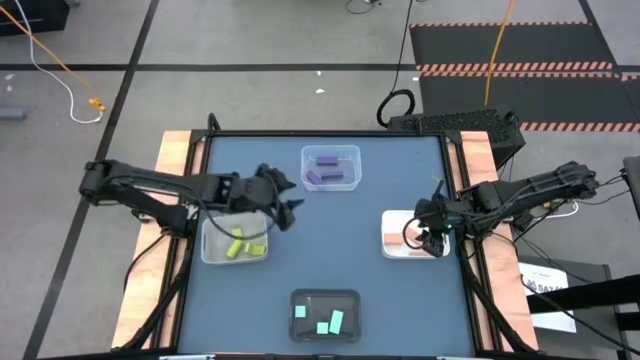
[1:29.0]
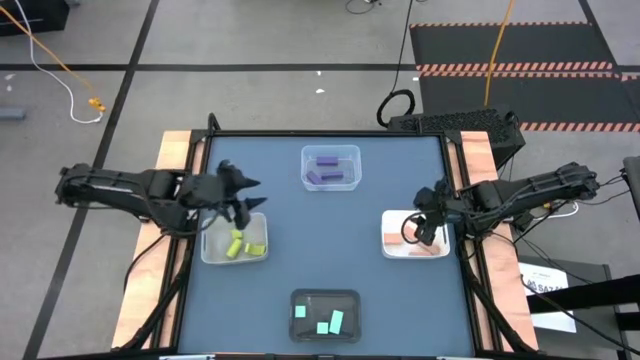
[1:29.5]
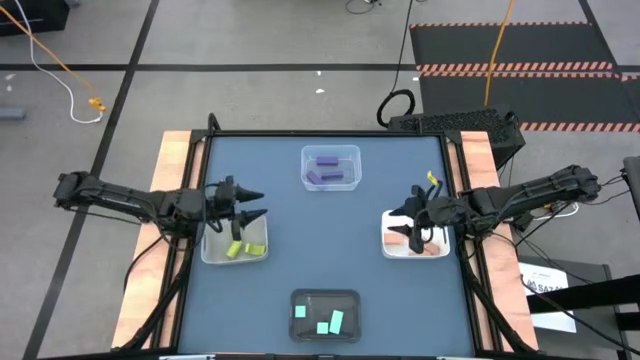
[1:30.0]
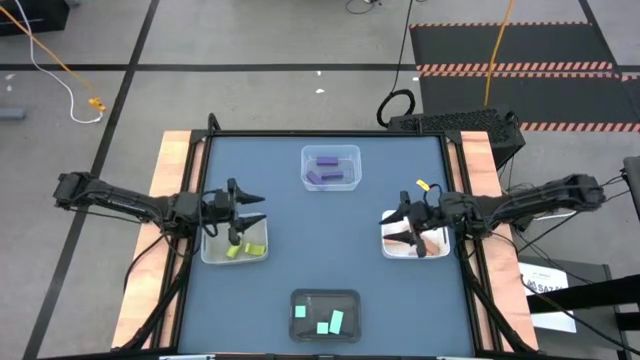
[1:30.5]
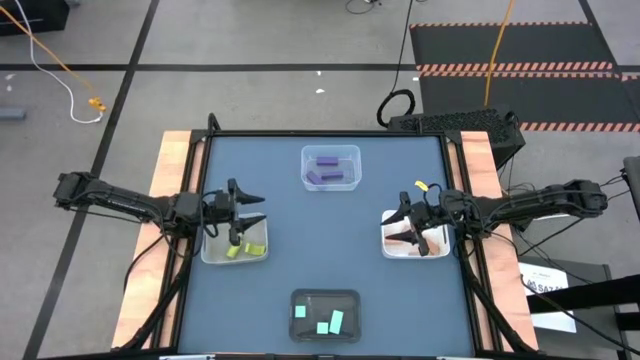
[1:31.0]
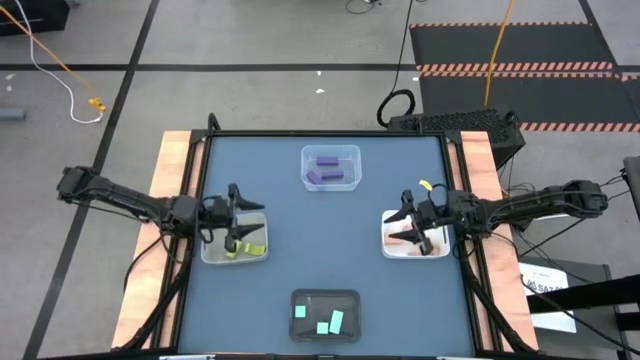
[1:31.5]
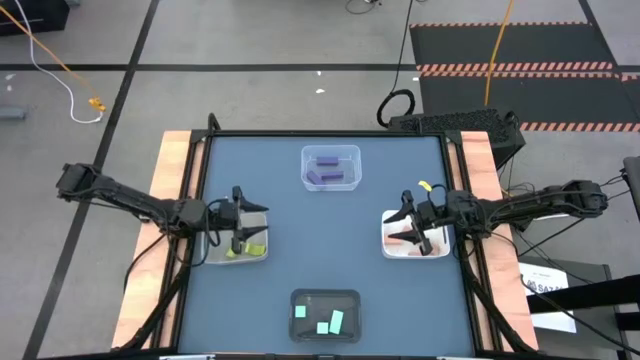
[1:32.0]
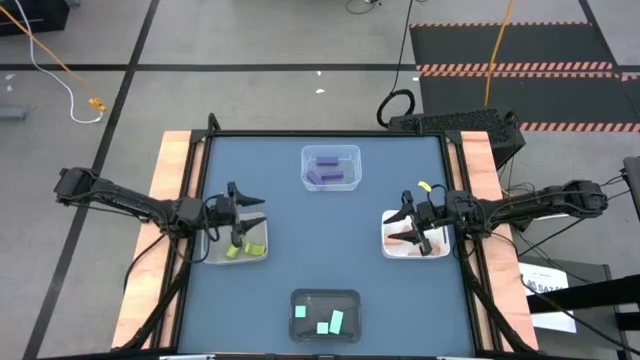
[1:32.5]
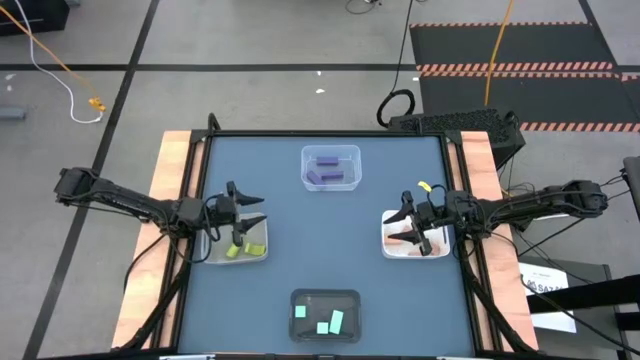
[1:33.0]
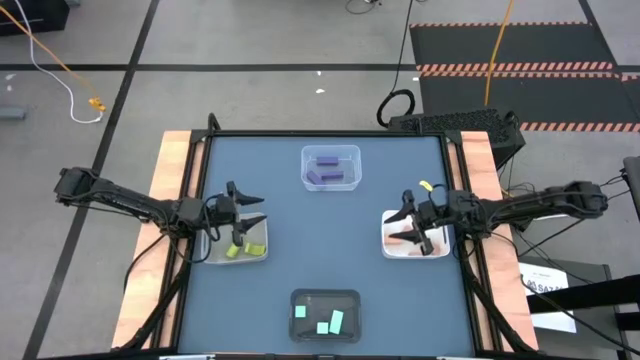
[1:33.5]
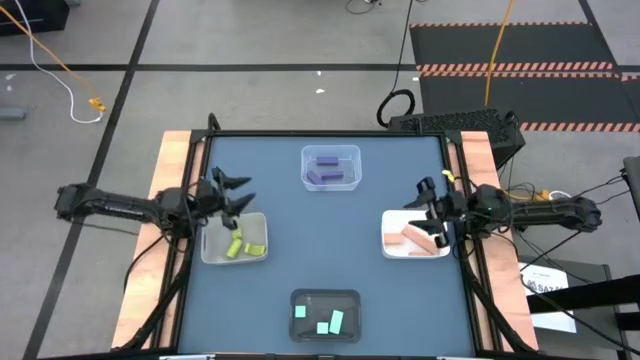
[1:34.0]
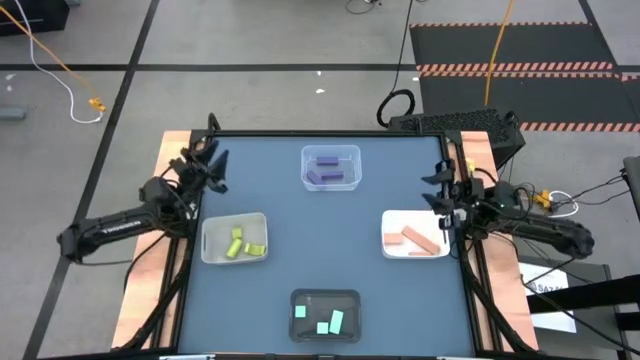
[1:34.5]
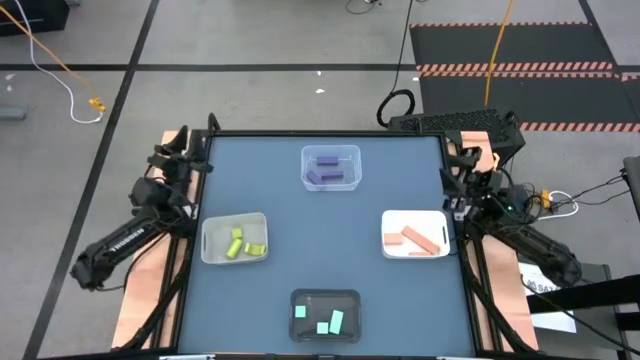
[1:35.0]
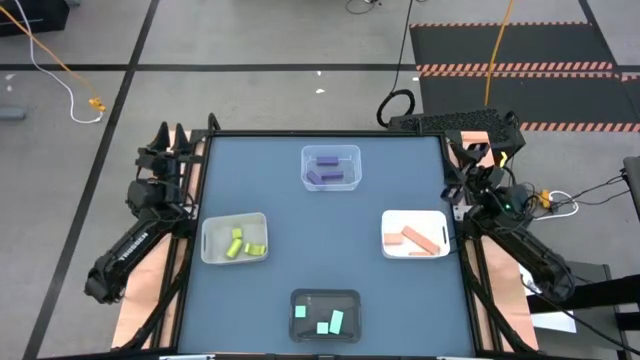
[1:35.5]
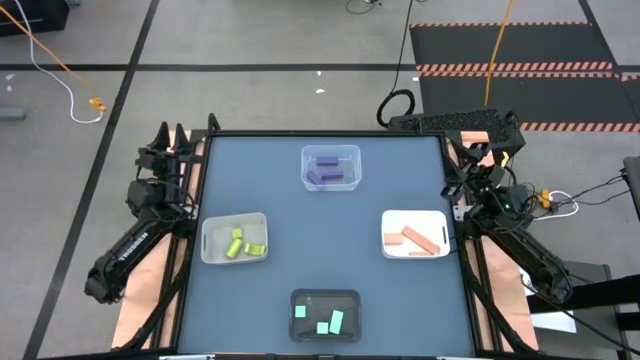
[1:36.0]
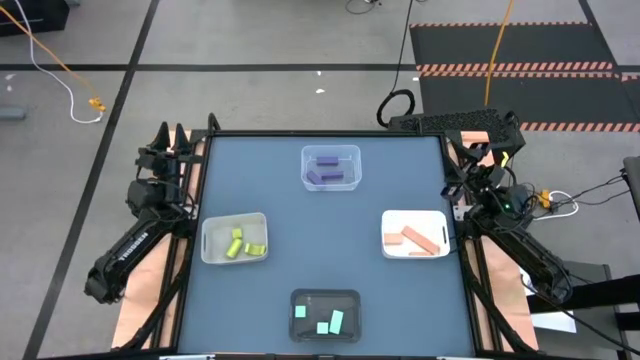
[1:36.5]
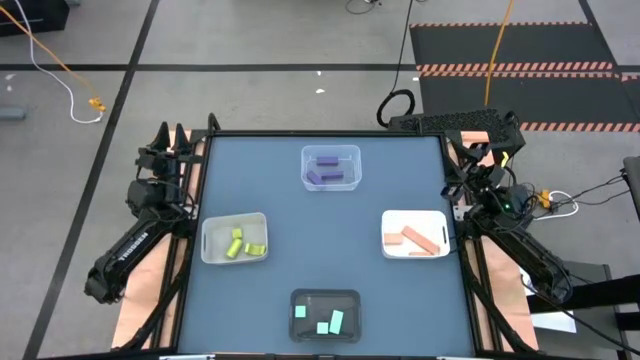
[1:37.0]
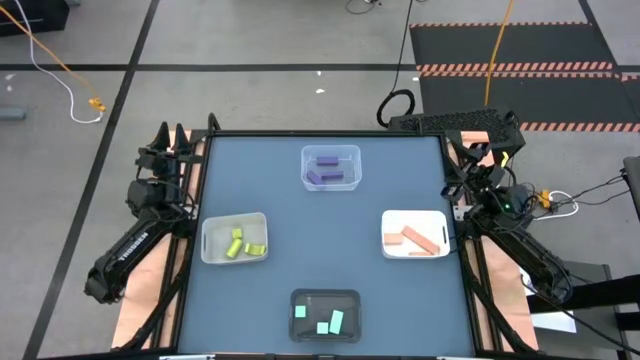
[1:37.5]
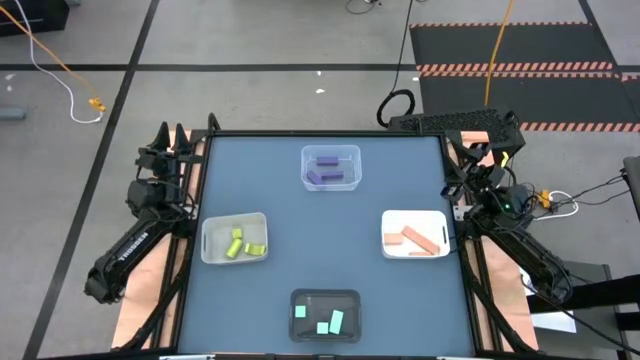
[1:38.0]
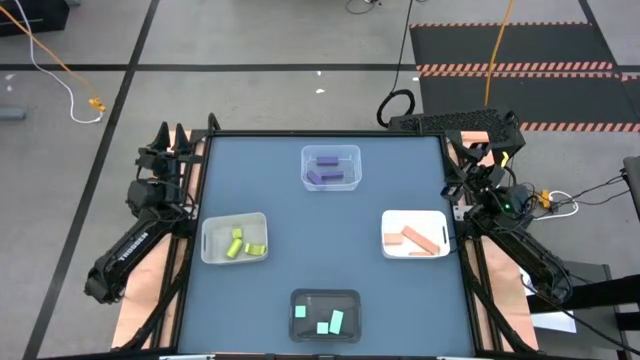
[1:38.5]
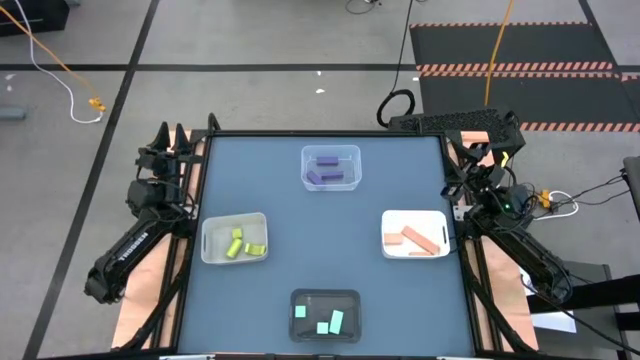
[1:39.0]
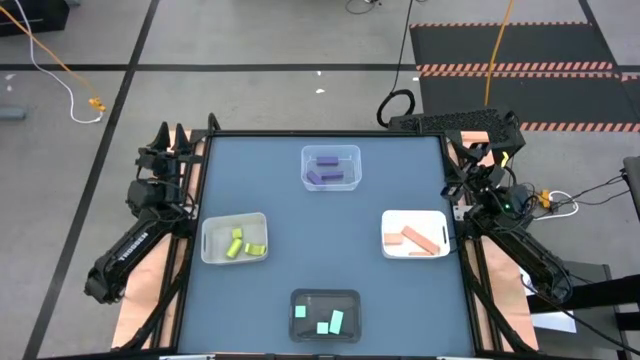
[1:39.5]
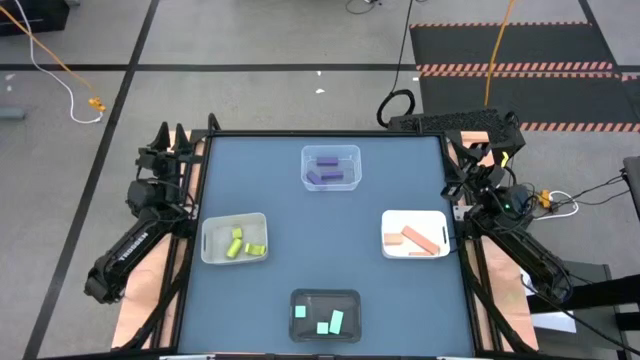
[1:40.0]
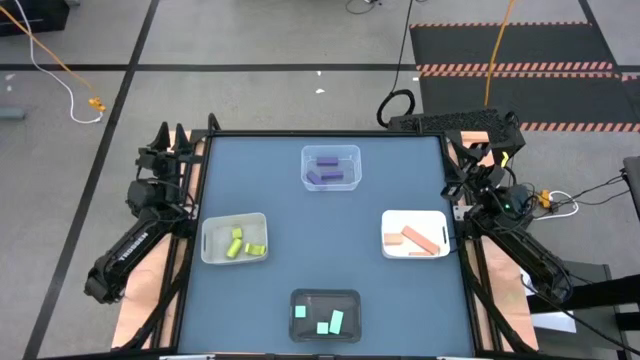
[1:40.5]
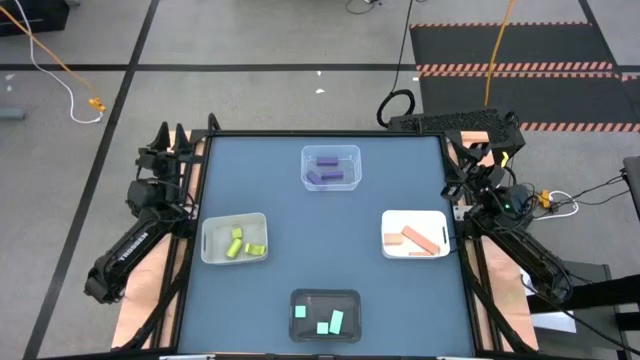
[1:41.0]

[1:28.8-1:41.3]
Task: Sort & place blocks by color
Return to Home Position

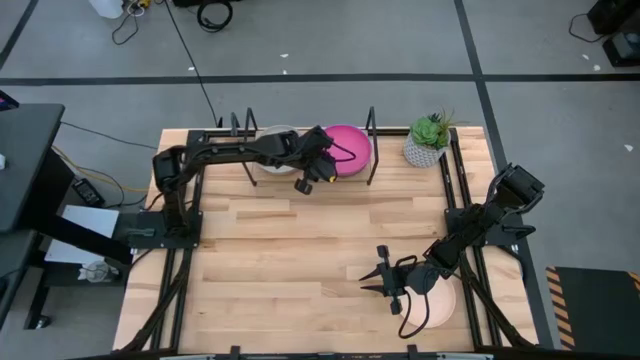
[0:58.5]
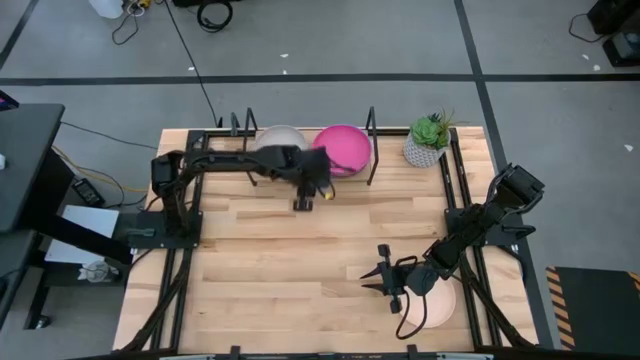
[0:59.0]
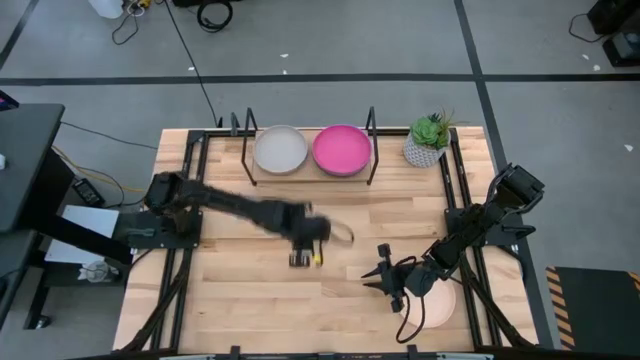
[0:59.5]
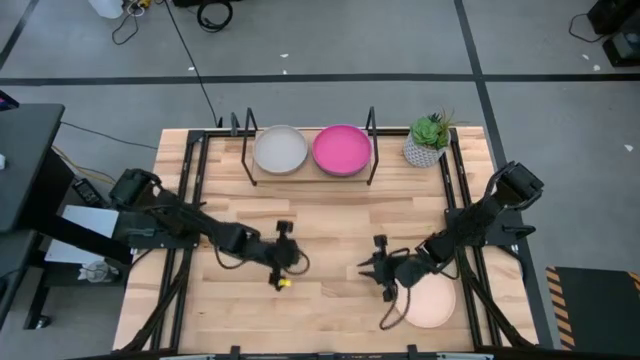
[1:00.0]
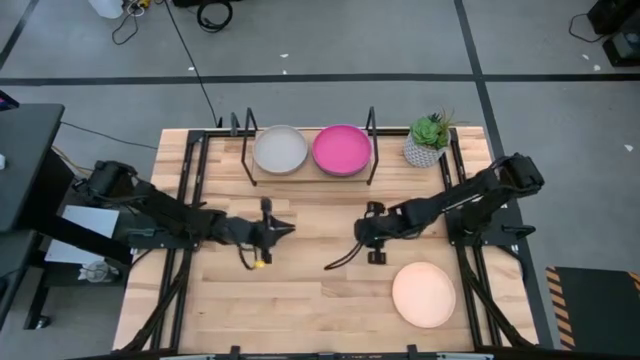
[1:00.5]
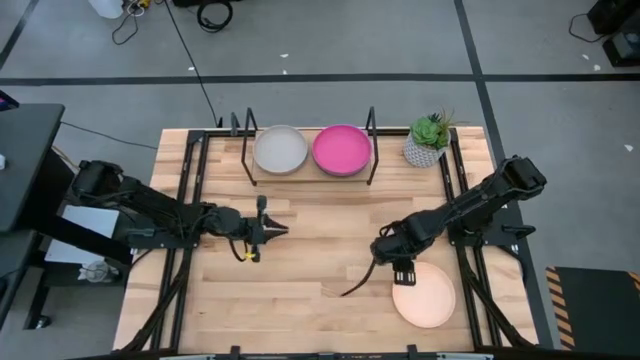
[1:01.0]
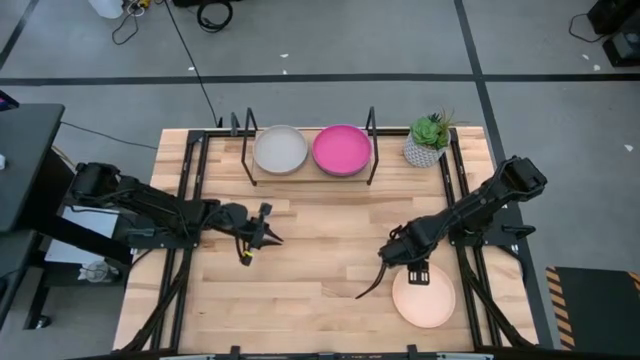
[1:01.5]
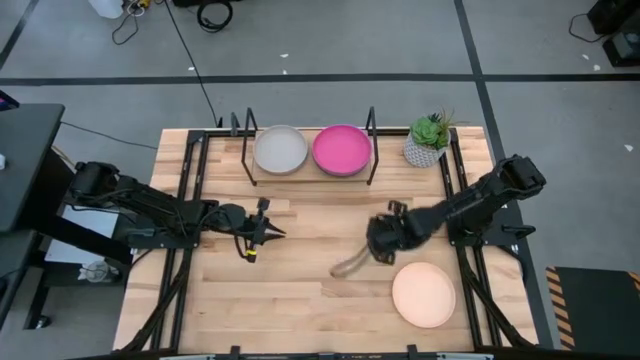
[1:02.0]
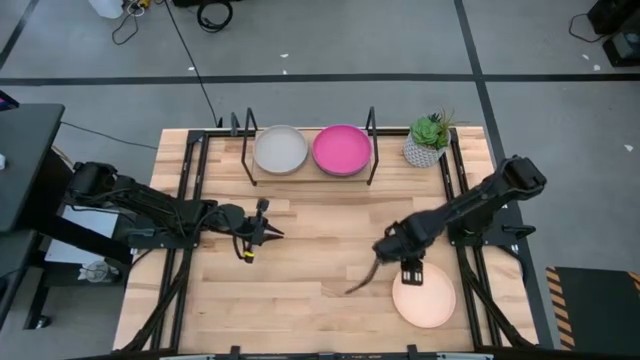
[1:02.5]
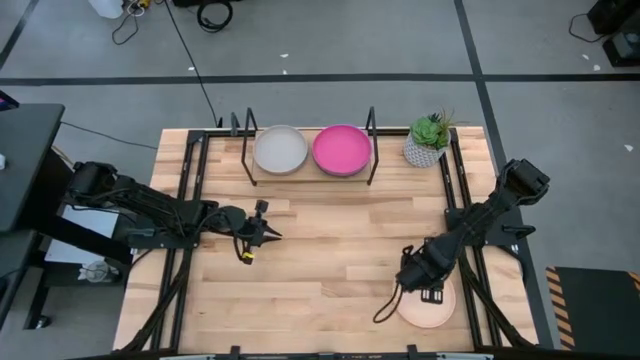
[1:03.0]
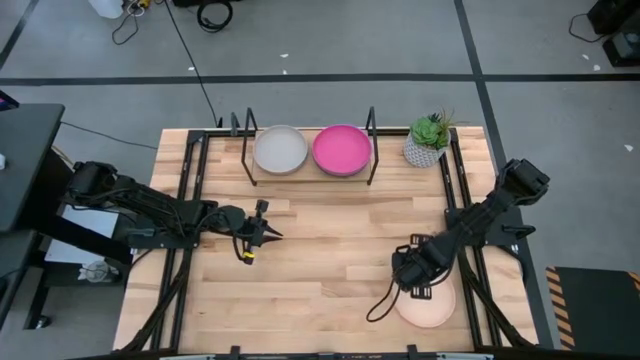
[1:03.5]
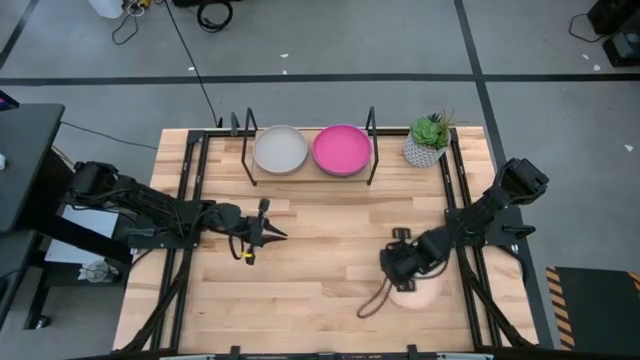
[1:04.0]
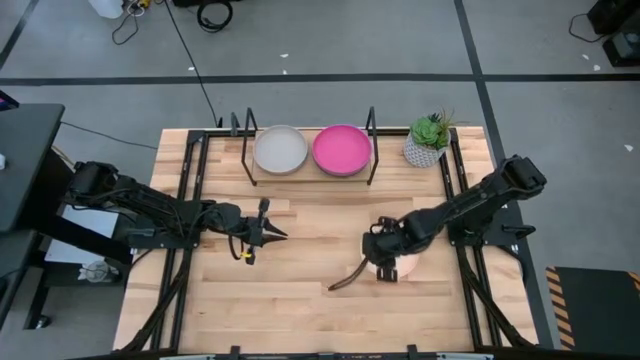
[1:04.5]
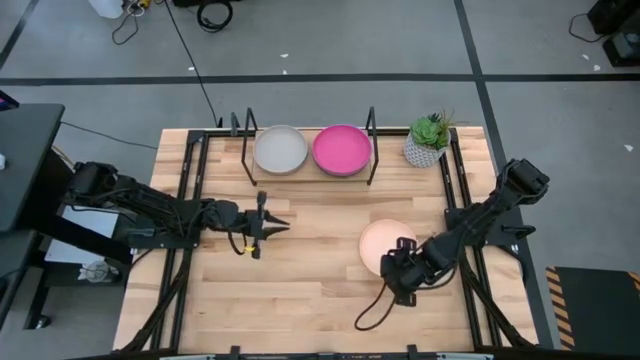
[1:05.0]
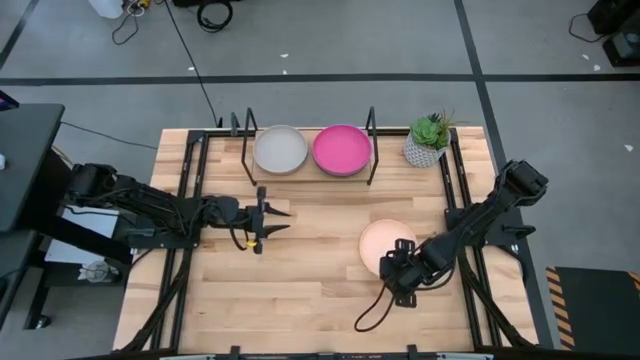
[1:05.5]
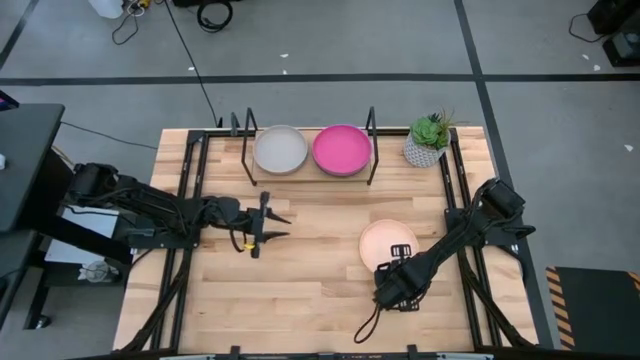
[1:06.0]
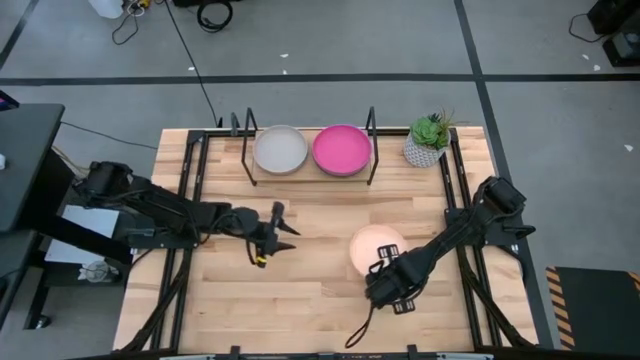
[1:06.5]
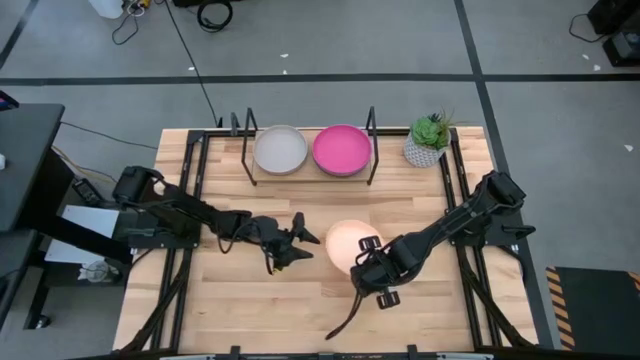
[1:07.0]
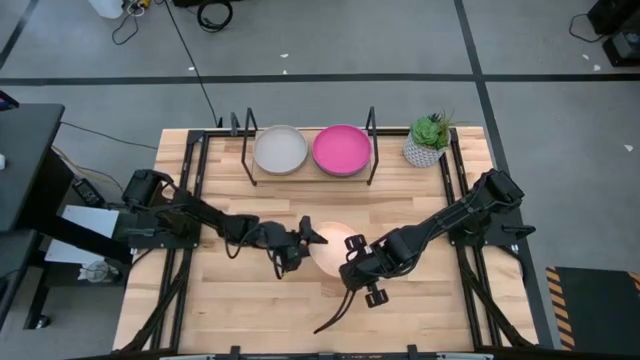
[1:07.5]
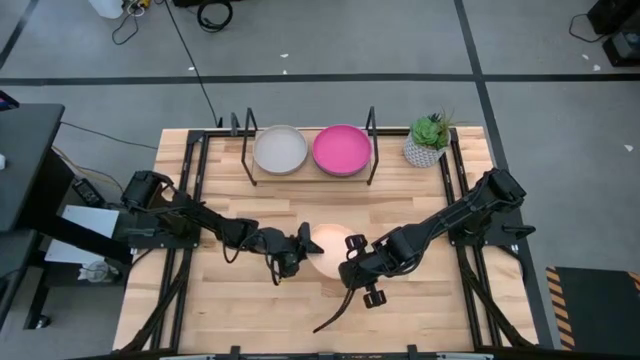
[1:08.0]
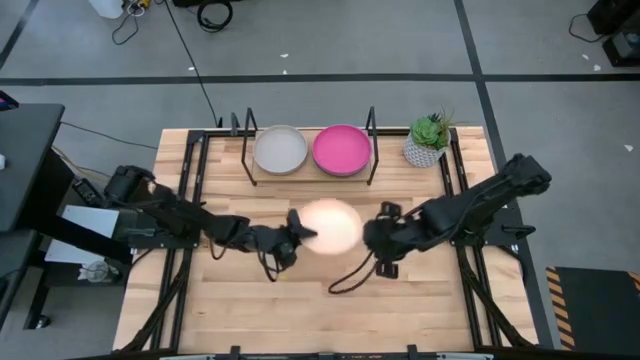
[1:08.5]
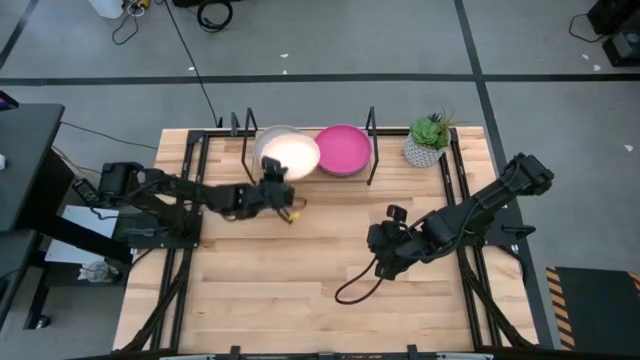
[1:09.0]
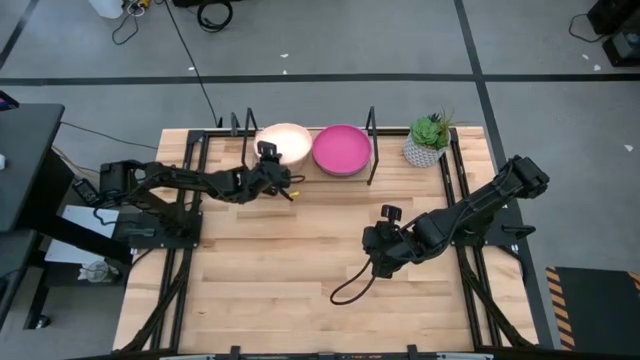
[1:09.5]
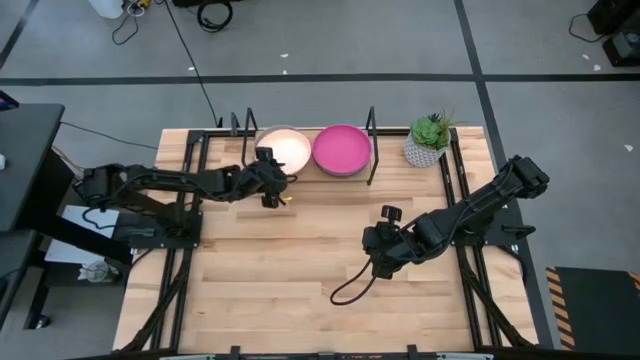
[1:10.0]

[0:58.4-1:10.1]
Task: Place and stack plates onto a shelf
Stack the light orange plate on top of the gray plate on the shelf
